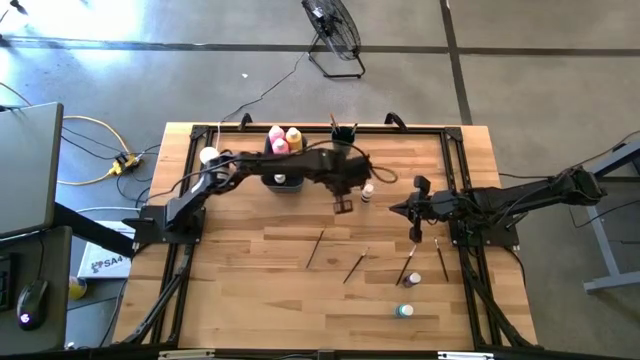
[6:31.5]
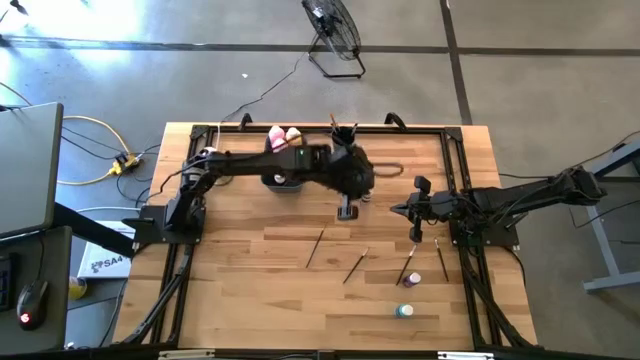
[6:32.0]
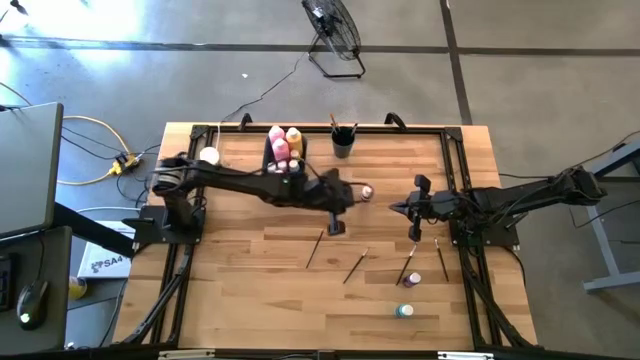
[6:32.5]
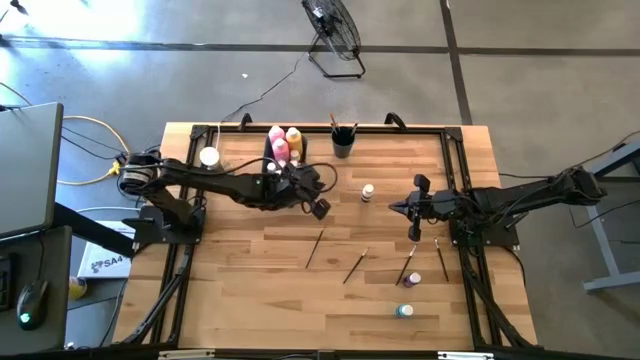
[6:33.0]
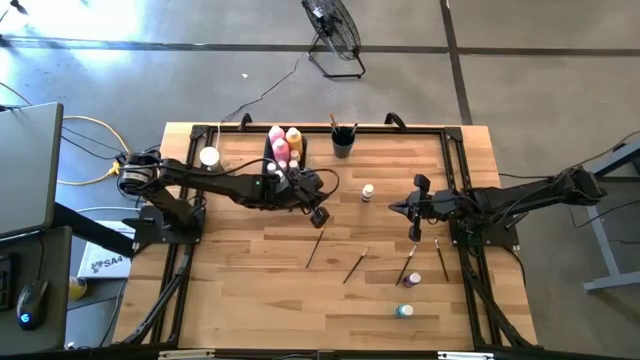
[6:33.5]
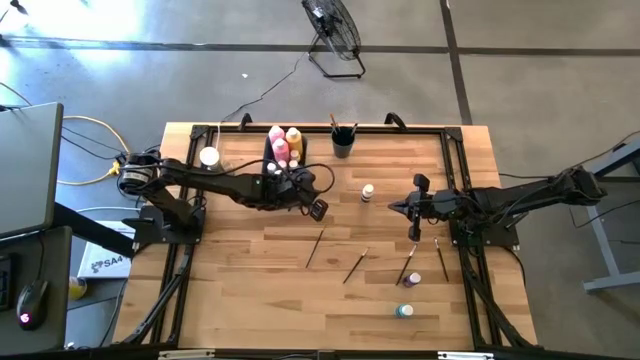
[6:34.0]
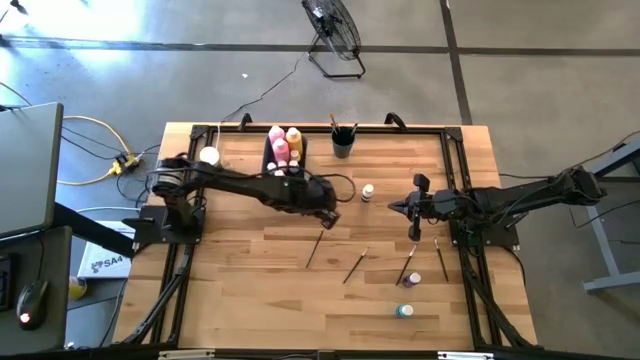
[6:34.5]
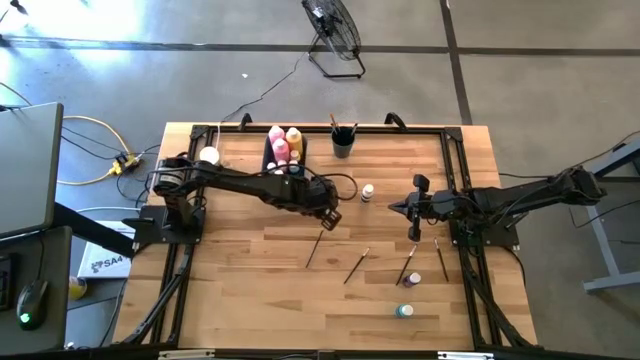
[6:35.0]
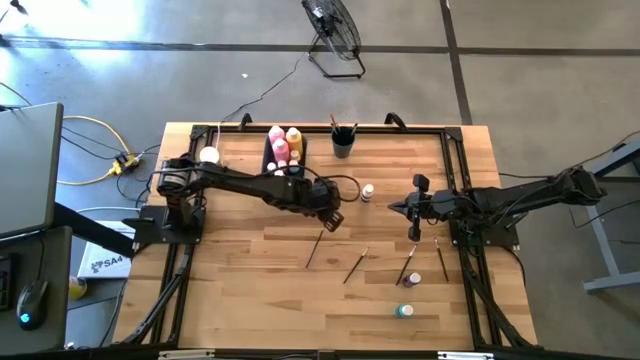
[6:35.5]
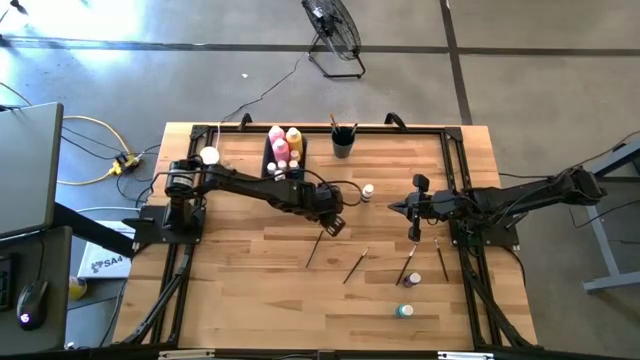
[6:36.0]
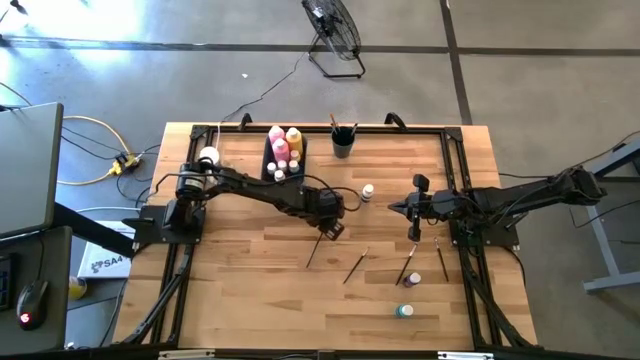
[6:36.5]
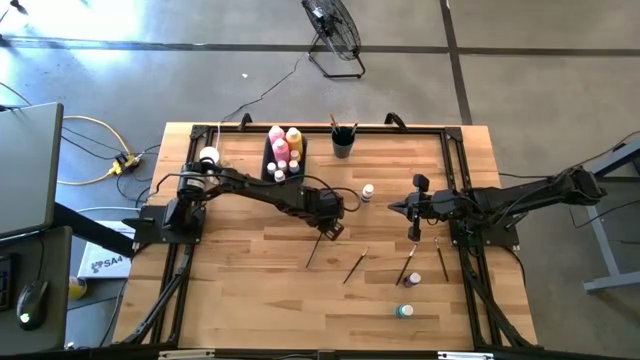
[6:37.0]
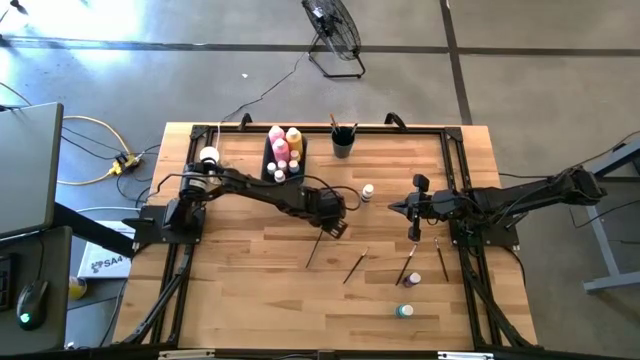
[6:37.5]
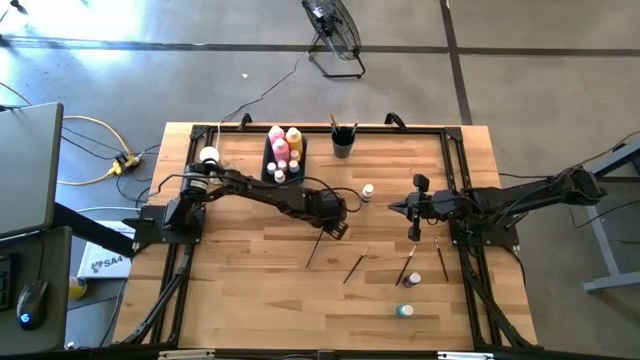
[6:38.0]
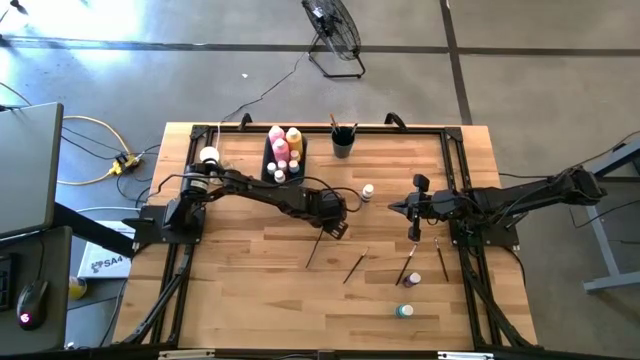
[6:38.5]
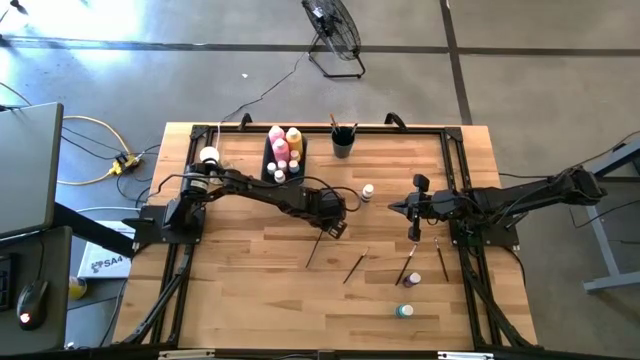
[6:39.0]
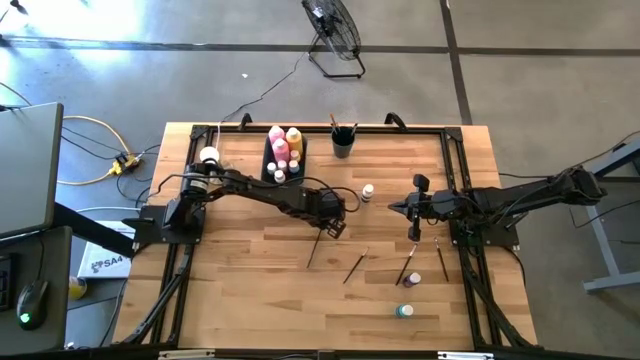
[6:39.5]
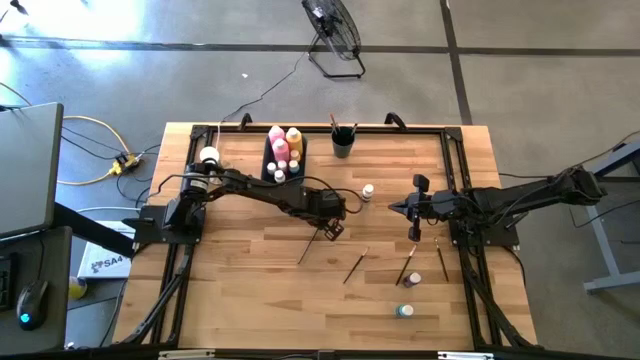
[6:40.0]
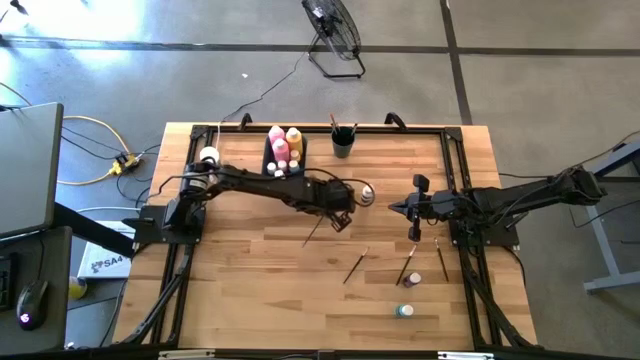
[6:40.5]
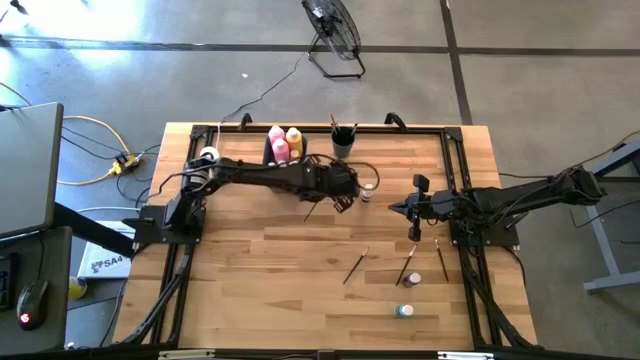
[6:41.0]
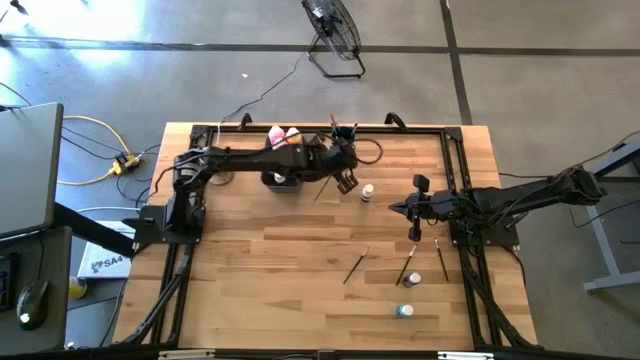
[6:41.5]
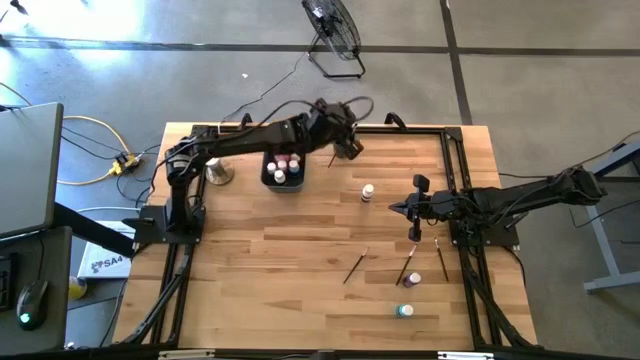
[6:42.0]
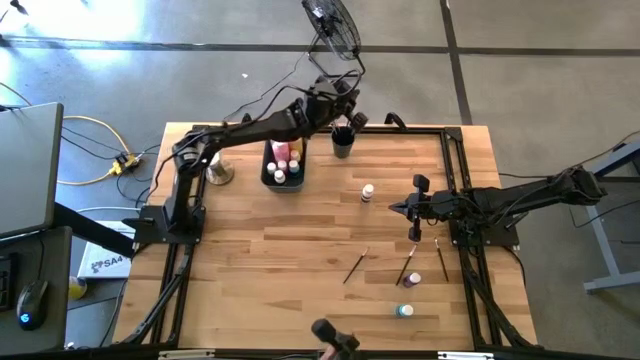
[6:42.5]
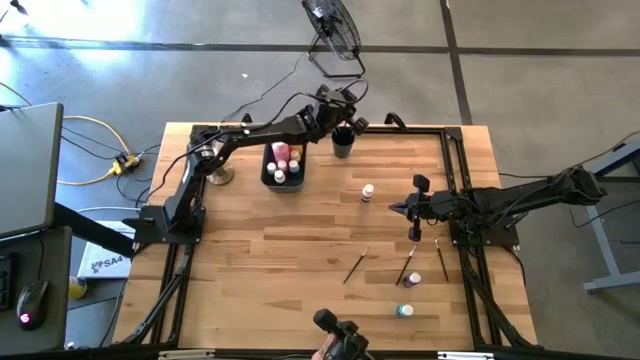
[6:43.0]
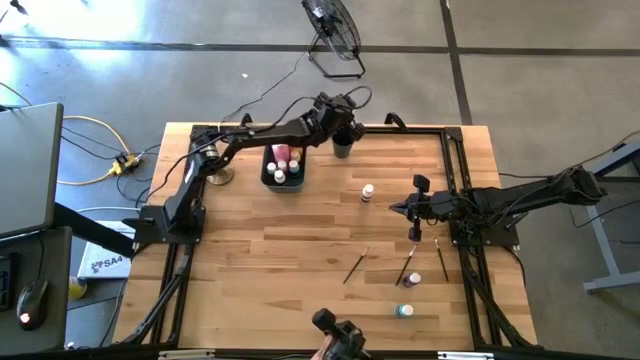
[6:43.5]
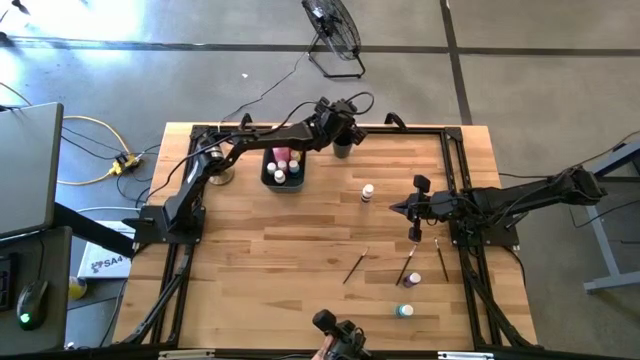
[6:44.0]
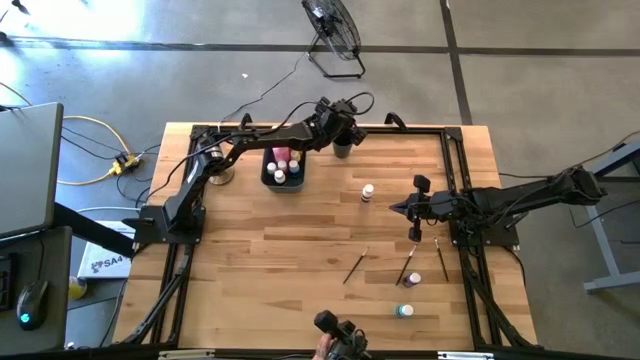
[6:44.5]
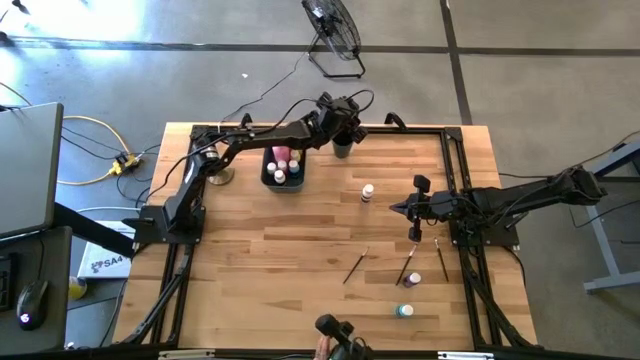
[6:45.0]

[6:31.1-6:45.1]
Task: Pick & Place Paint Supplies
Put the gold paint brush into the green cup
